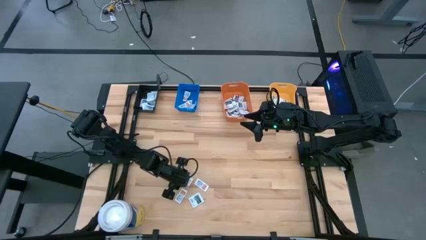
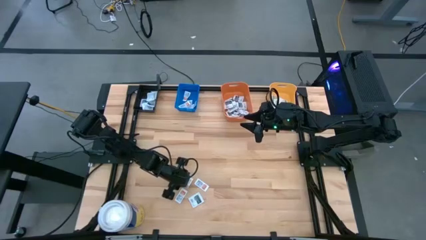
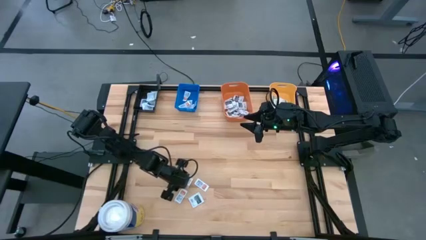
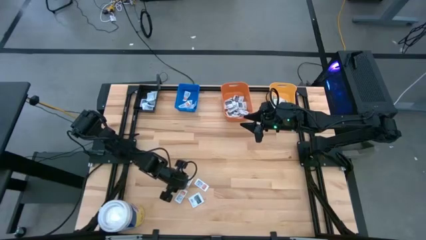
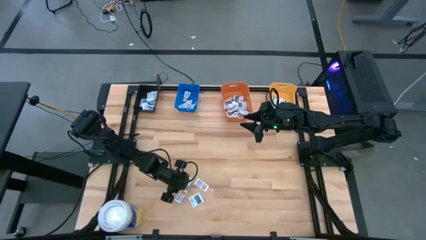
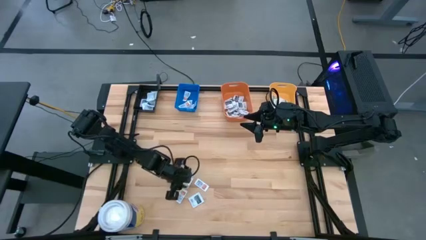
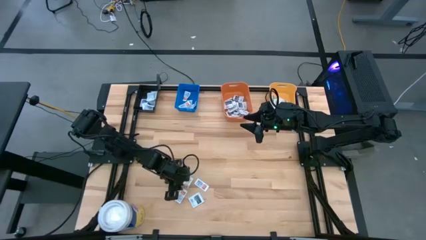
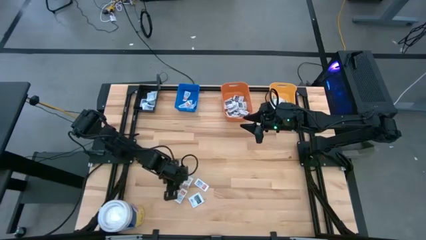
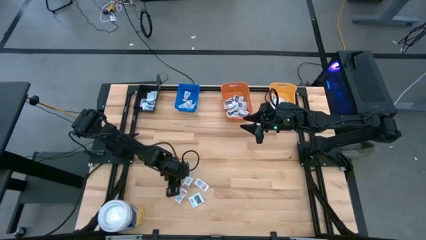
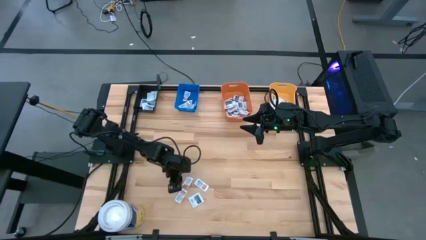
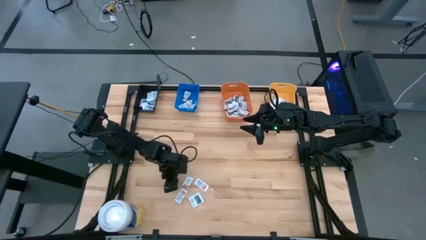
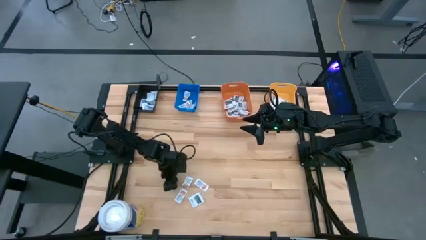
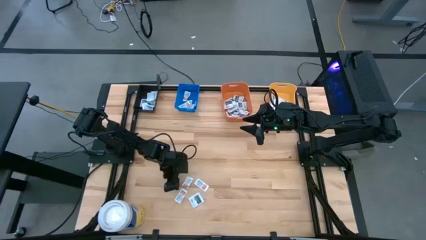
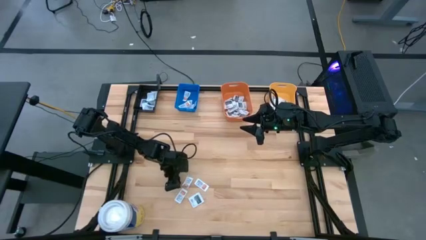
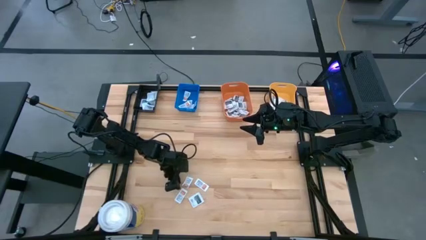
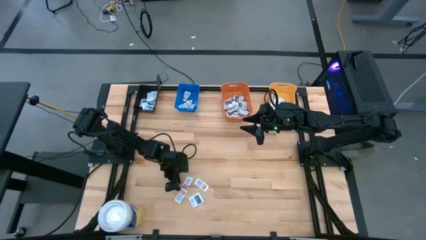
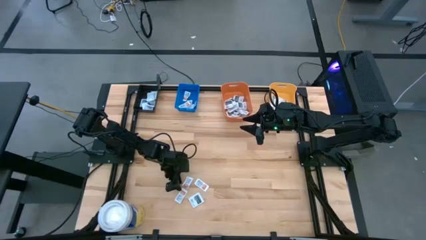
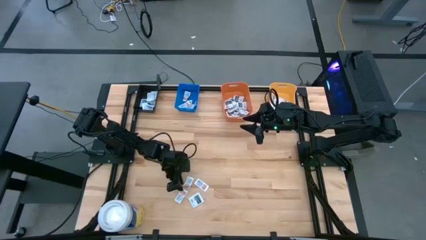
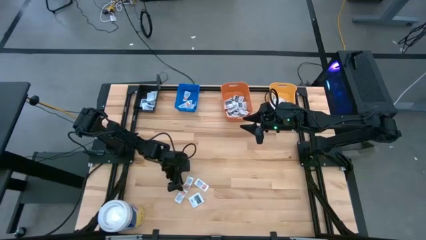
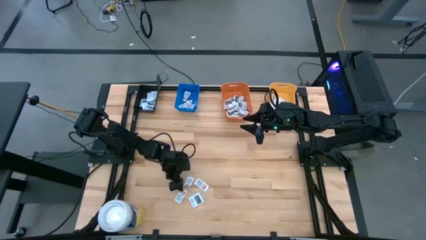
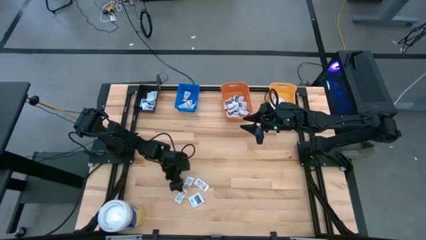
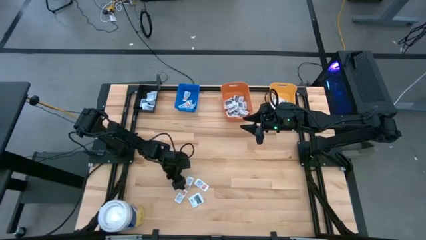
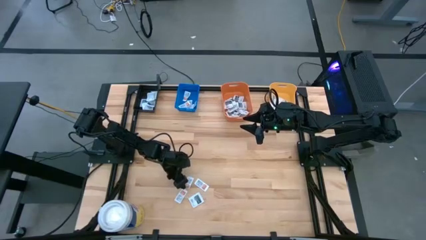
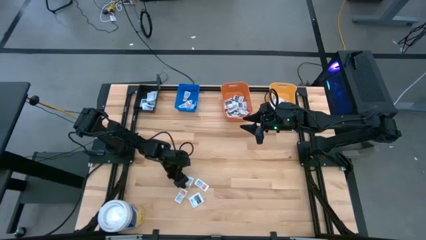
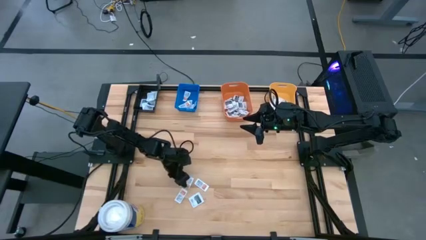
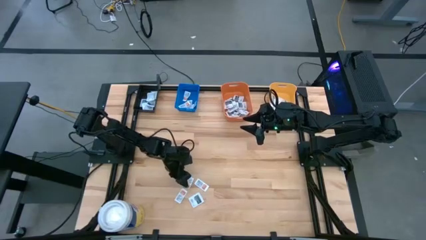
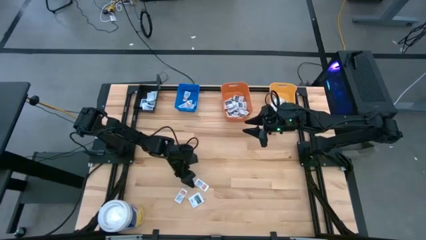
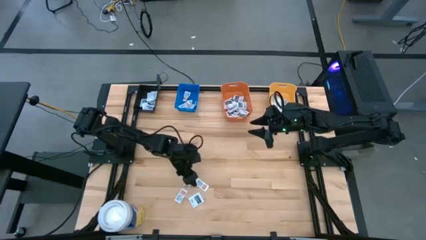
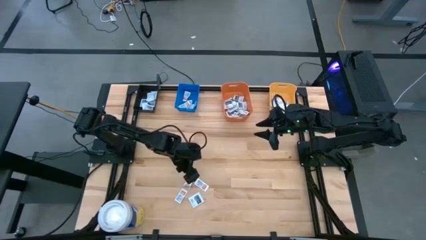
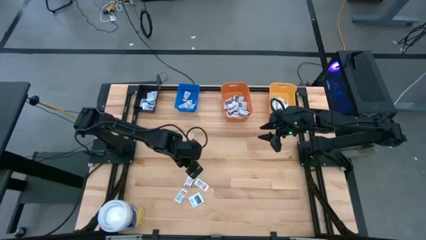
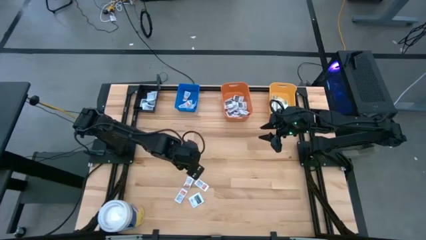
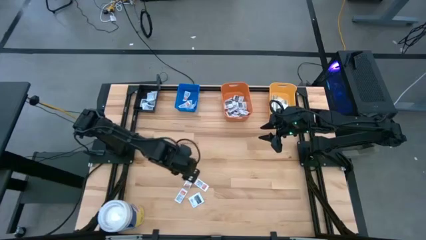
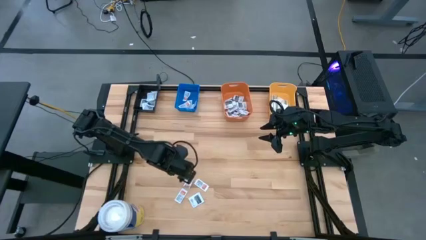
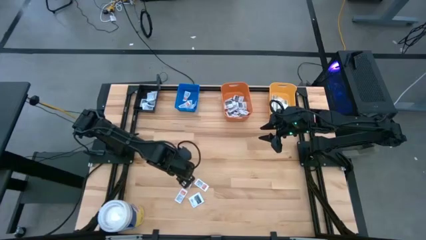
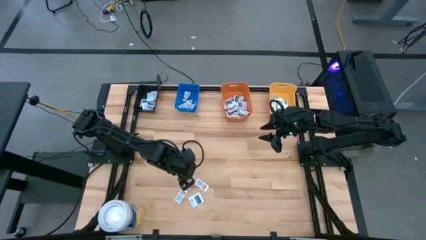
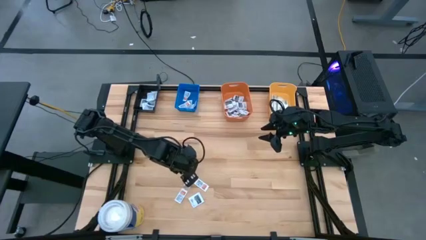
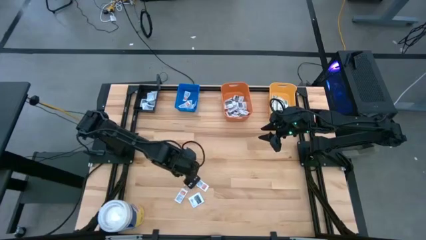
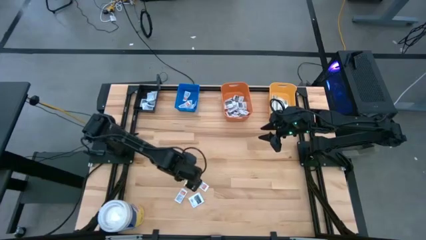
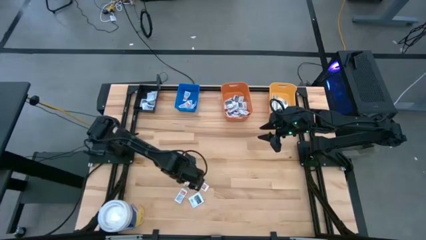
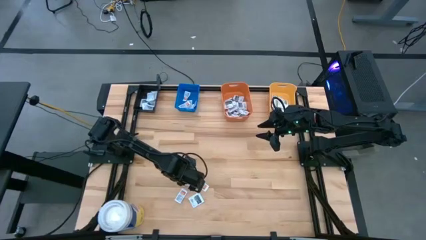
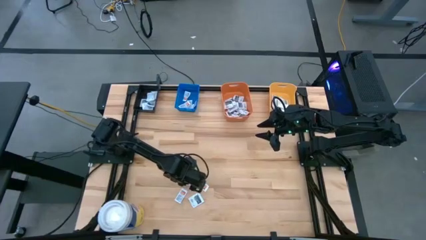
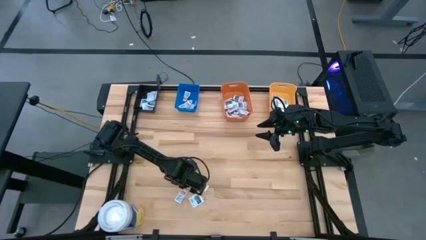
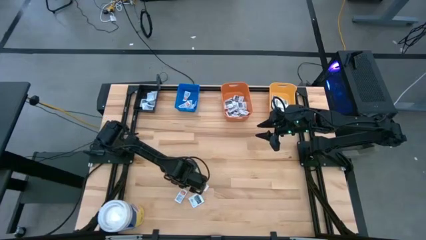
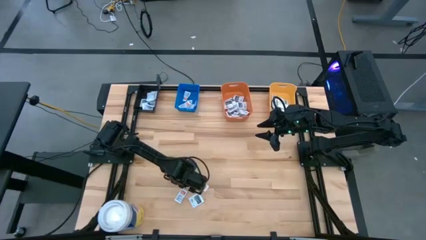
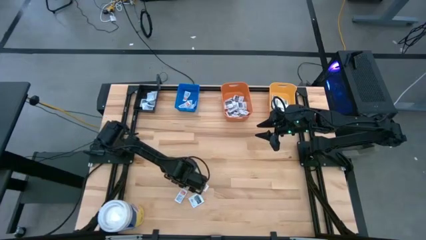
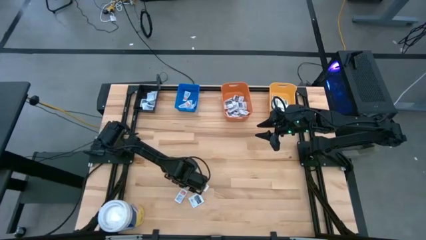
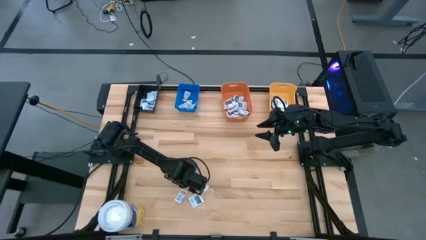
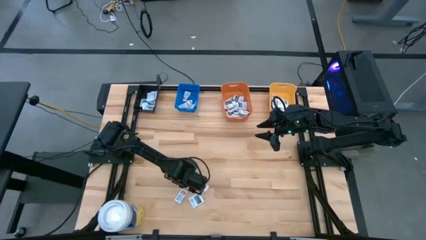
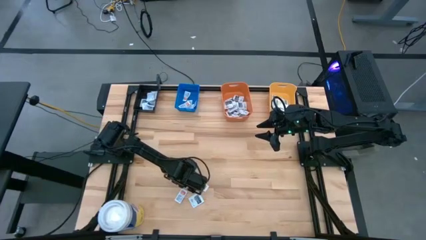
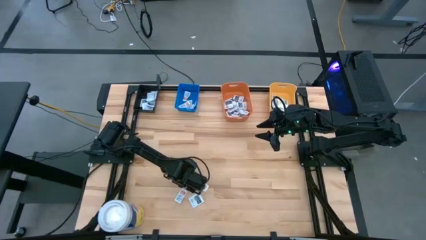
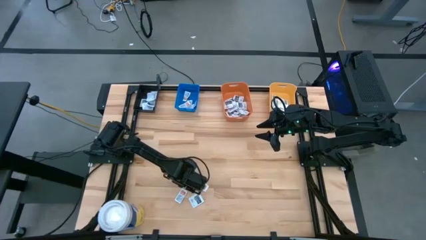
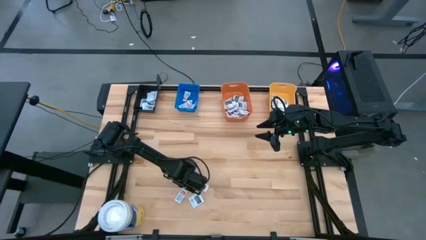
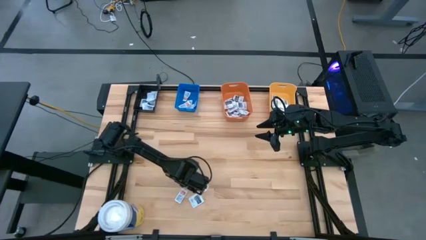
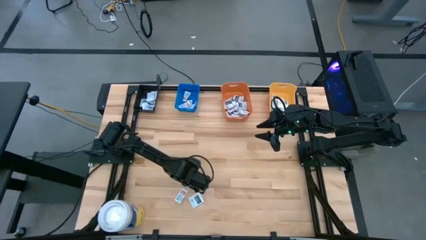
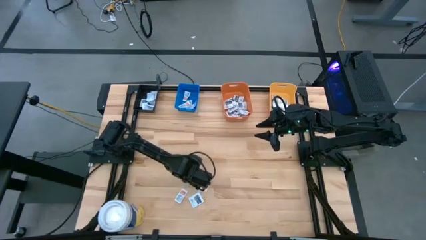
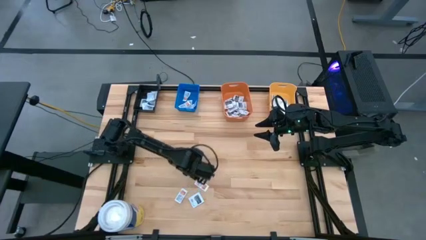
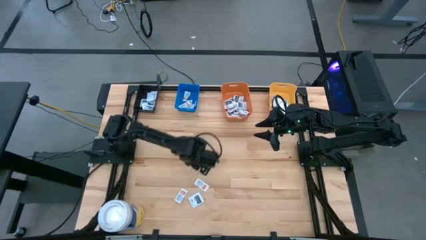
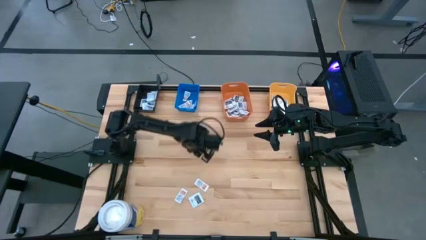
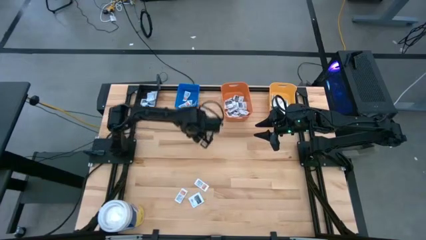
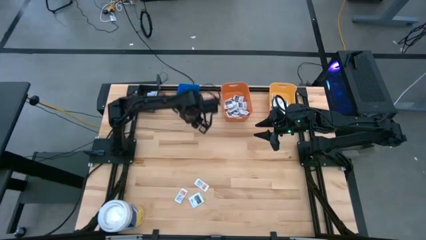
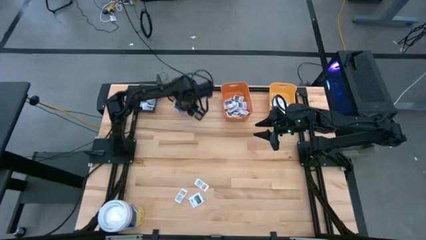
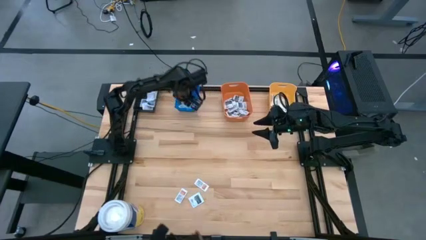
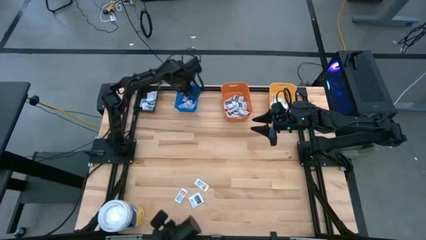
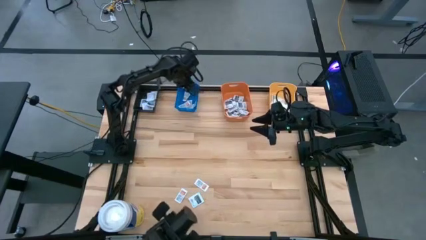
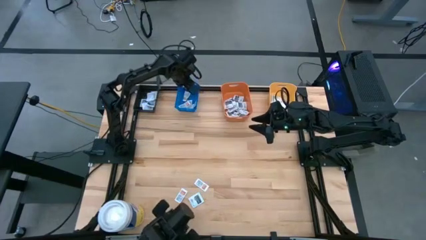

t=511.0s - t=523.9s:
Task: Pick & Place First Aid Supplies
Put the ointment pack into the blue bin

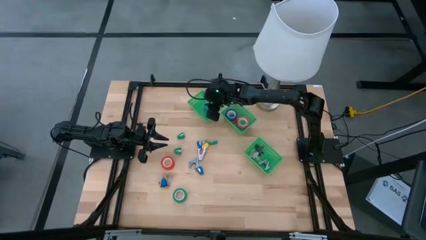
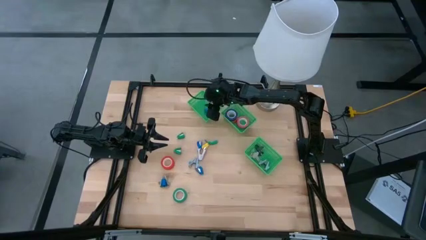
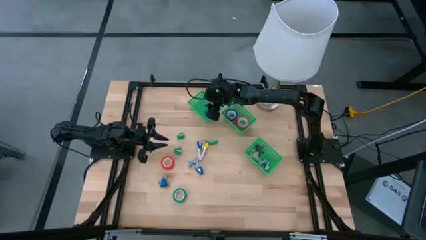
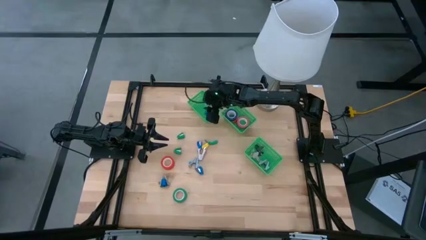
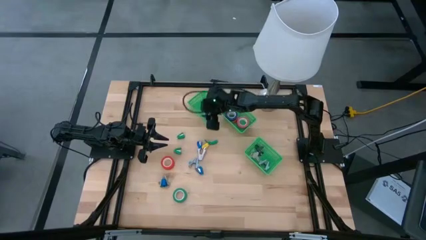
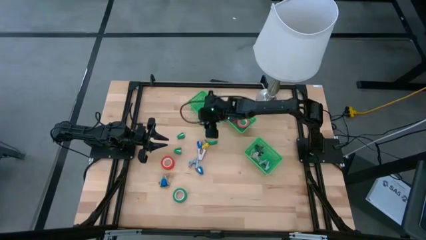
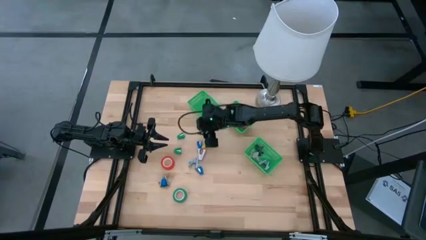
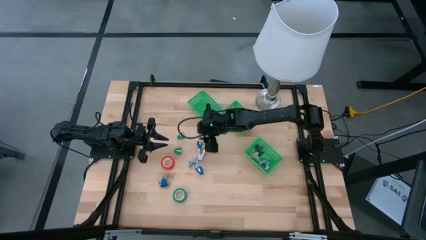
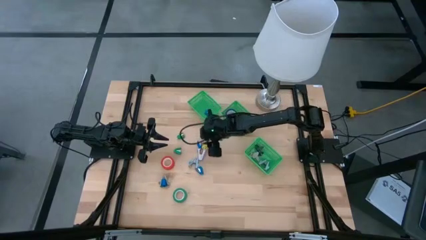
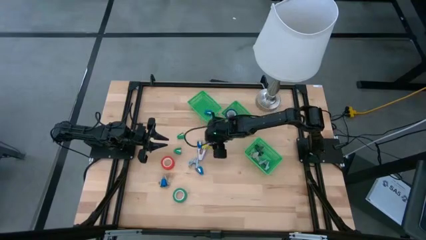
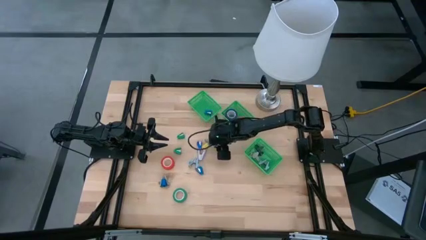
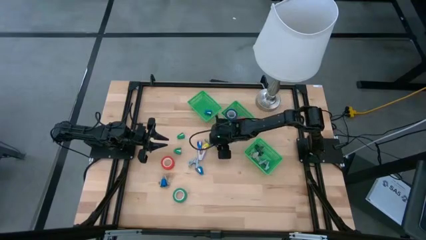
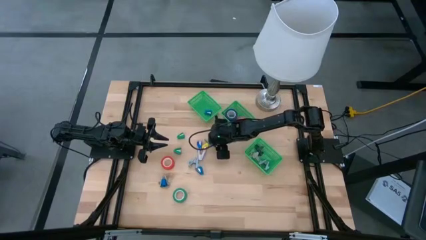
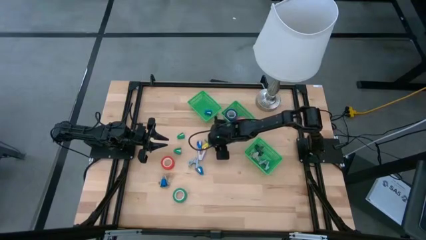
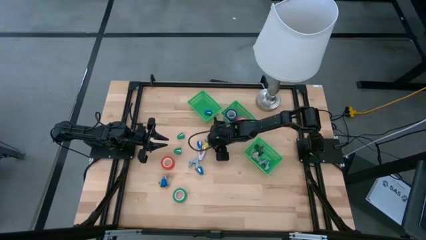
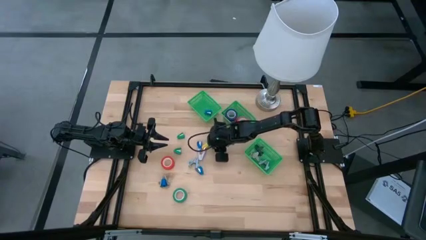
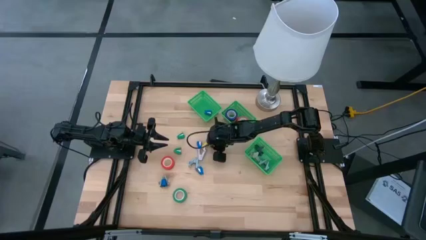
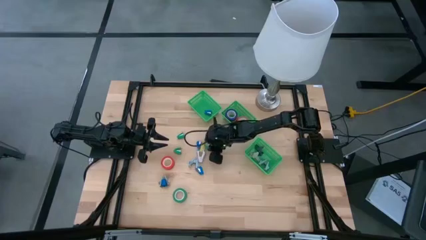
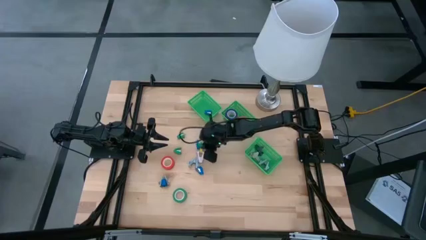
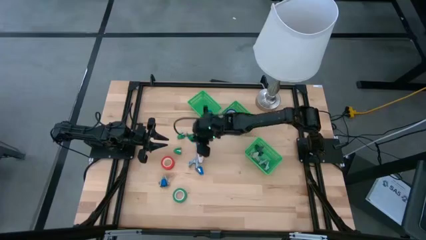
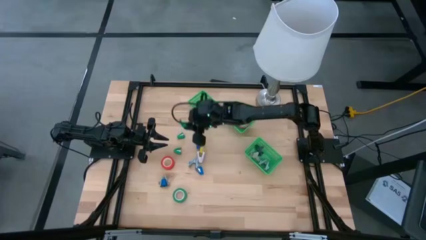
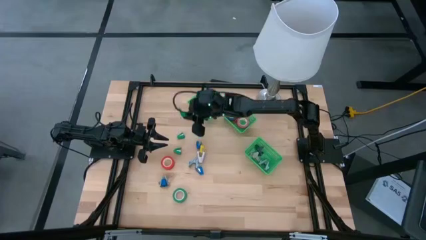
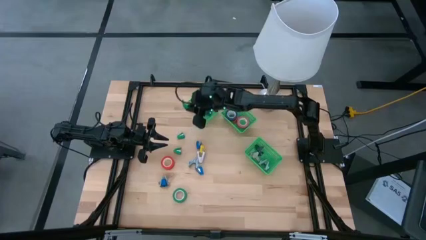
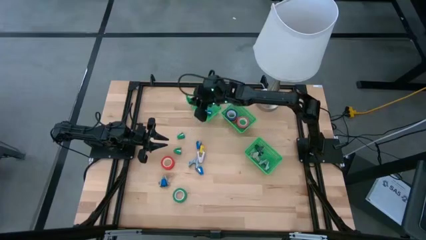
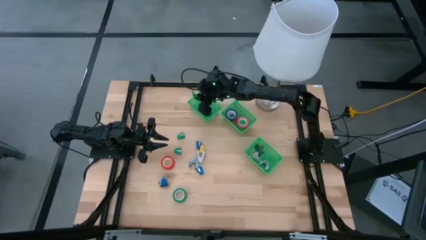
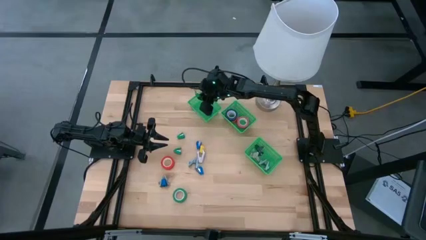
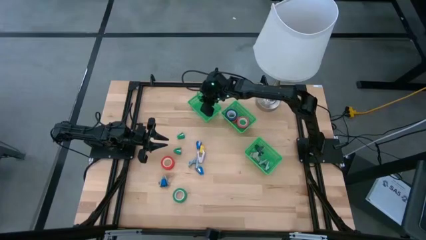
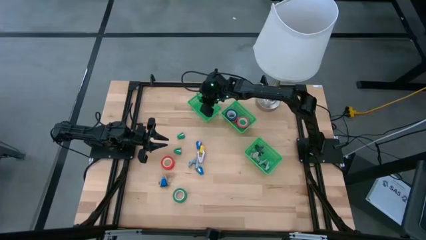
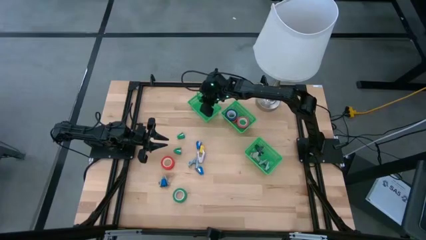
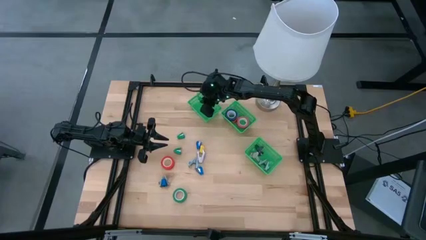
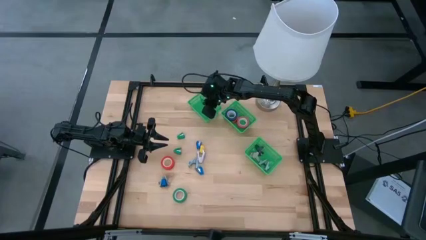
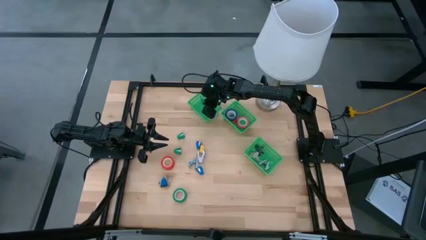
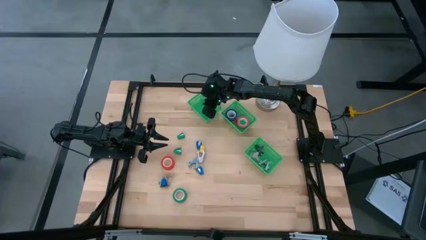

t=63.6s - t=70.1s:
Task: Pick and place Stapler, Stapler remover, tape
Put the top right green stapler into the top basket
